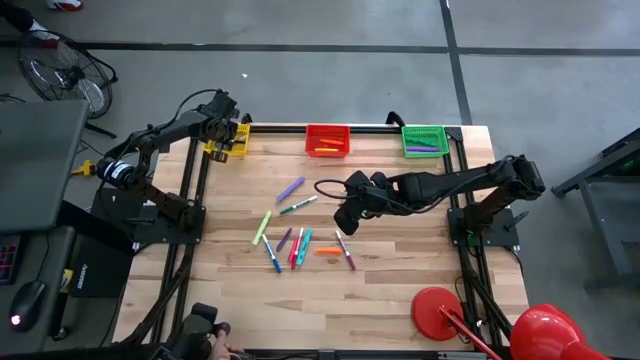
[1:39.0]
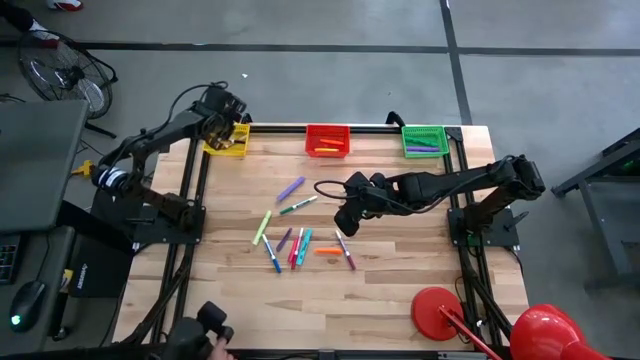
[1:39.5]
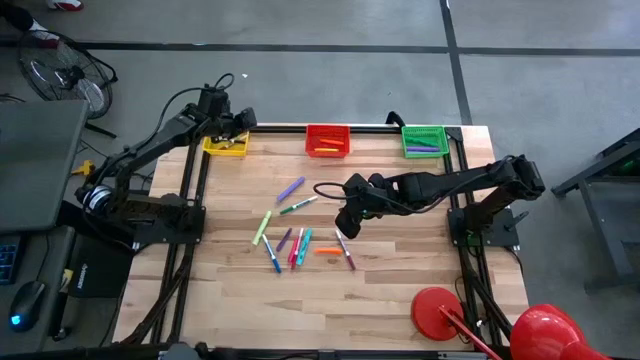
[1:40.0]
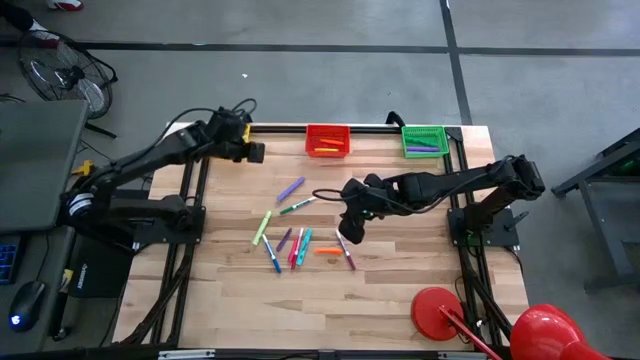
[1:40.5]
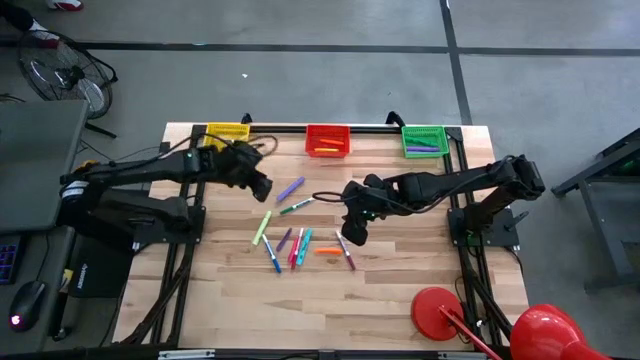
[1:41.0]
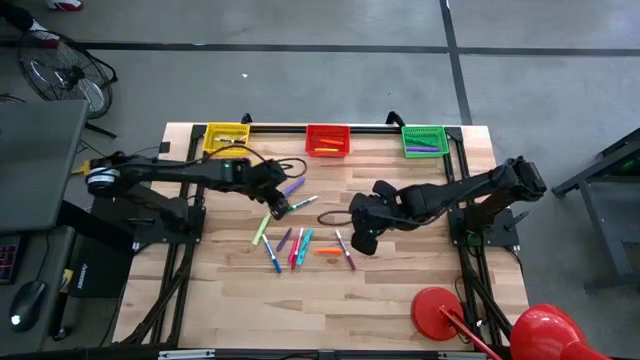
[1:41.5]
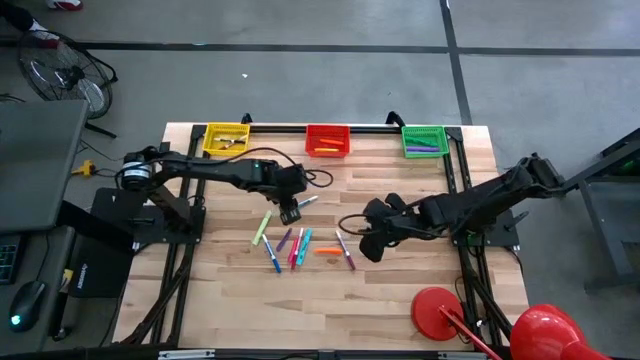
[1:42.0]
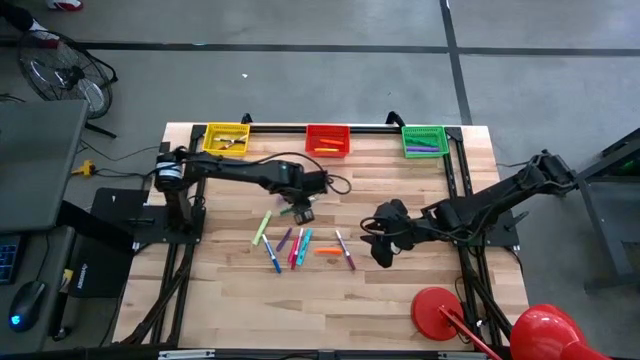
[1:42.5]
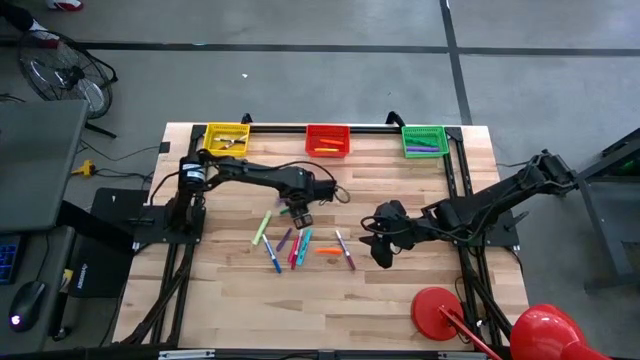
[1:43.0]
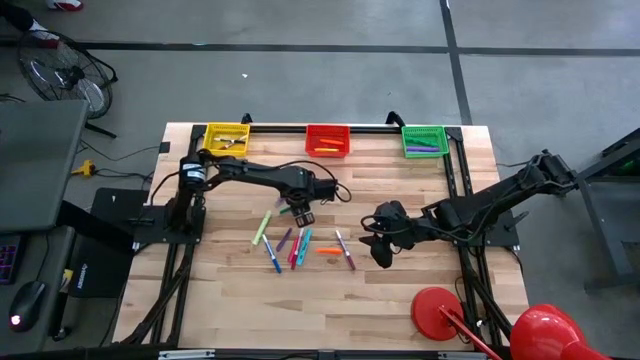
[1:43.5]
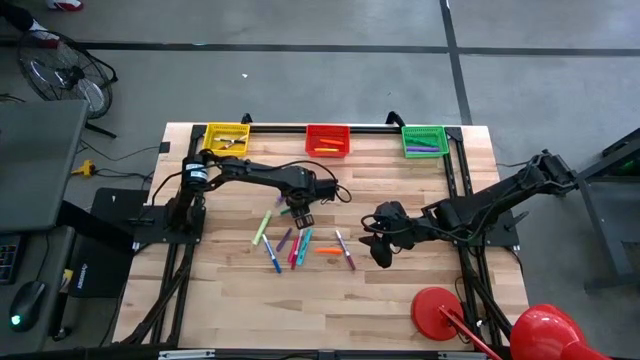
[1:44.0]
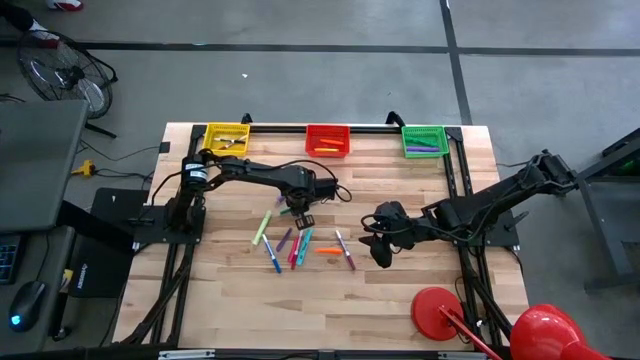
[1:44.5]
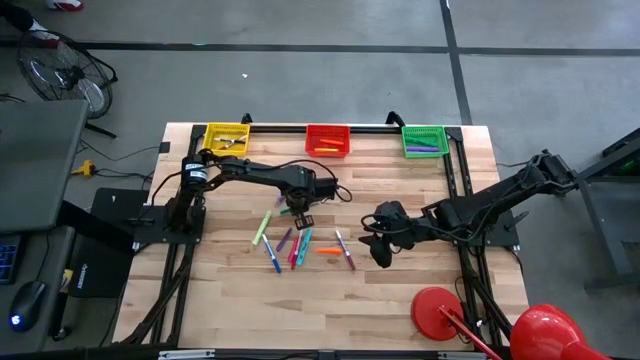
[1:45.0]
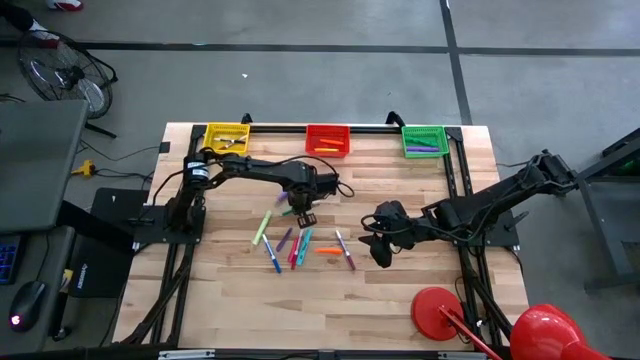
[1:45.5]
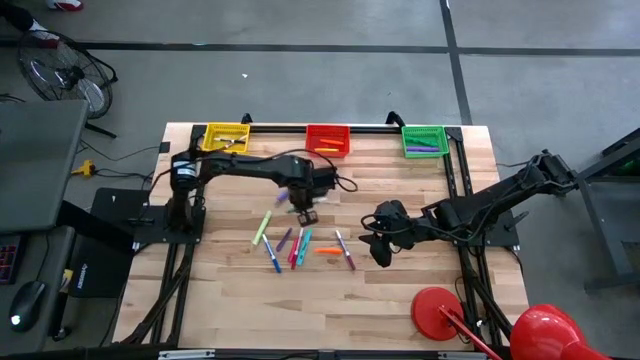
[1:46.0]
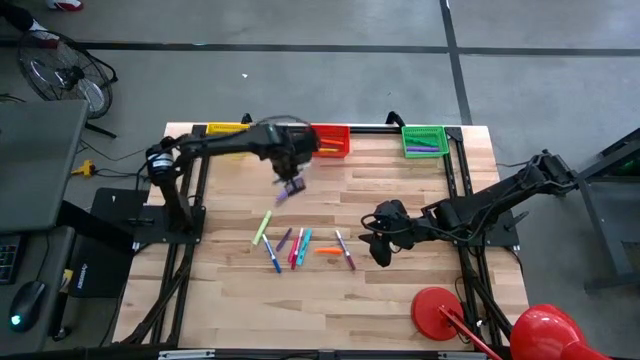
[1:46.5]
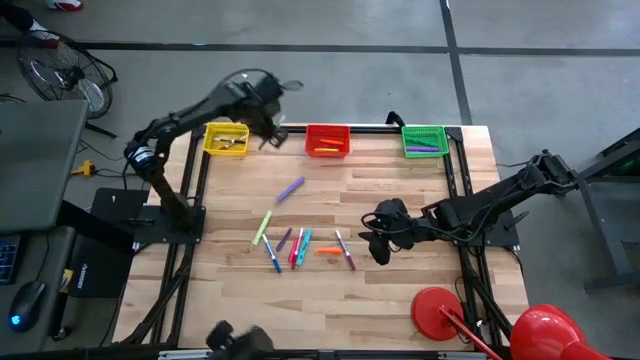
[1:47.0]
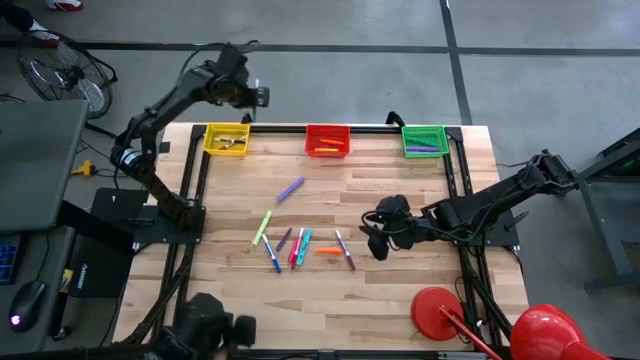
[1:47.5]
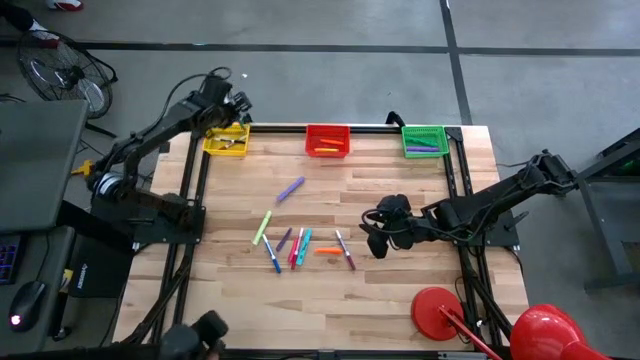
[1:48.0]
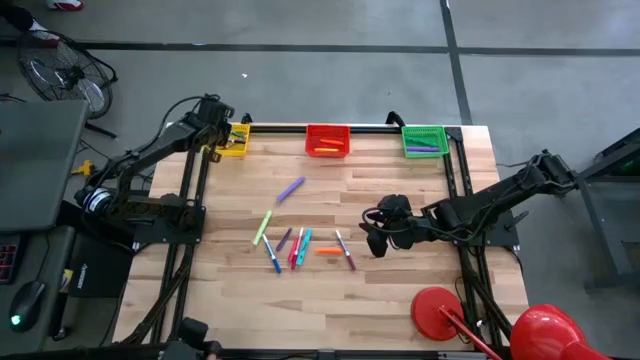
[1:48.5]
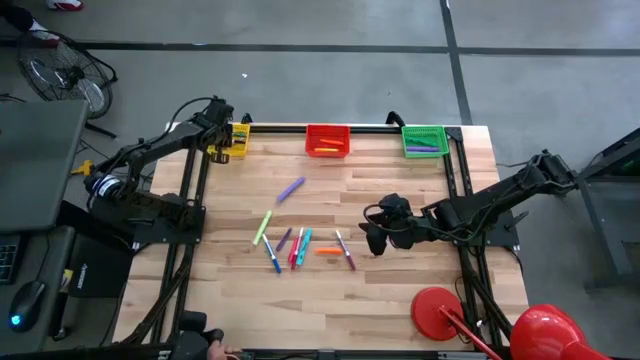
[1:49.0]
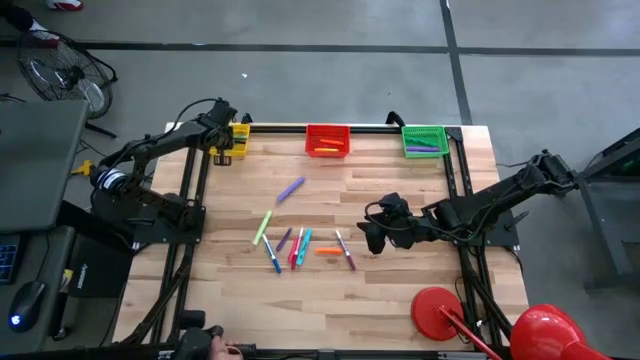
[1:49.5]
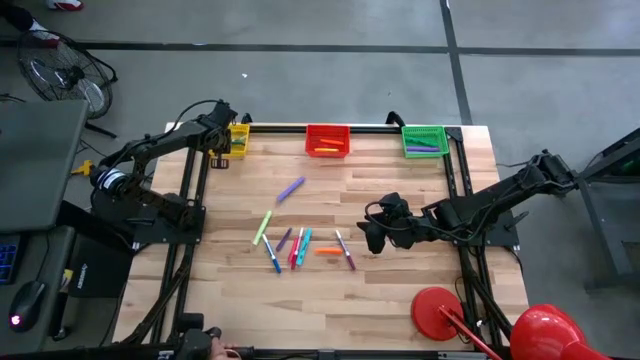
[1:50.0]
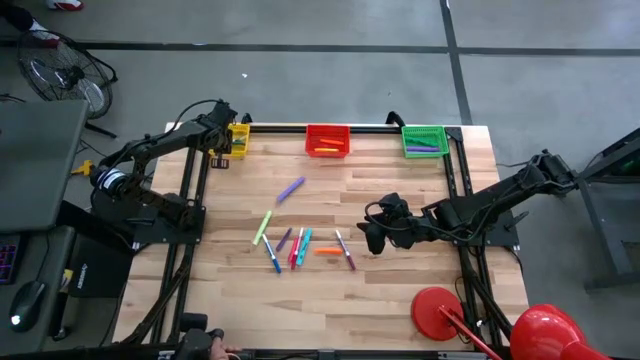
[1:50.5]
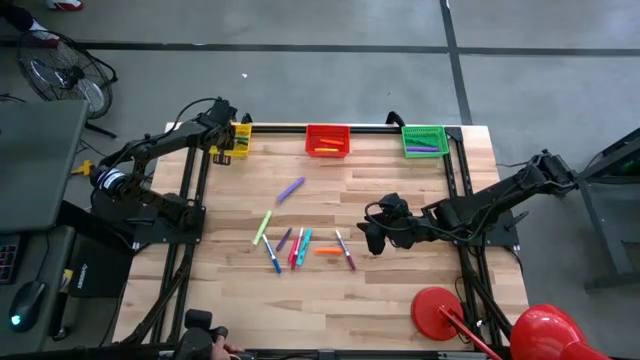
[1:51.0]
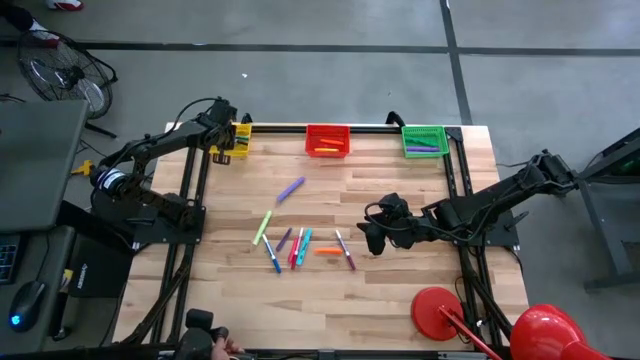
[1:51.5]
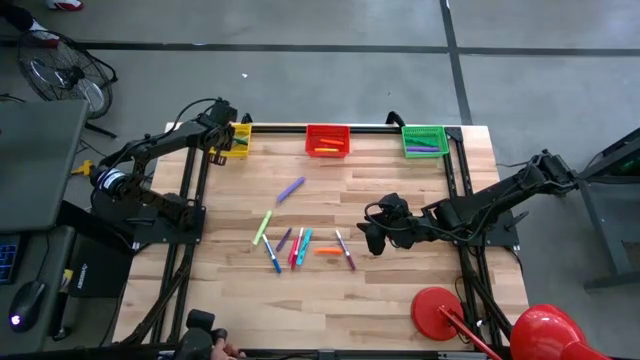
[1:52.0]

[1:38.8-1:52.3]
Task: Pick & Place Markers
Put the green marker into the yellow bin

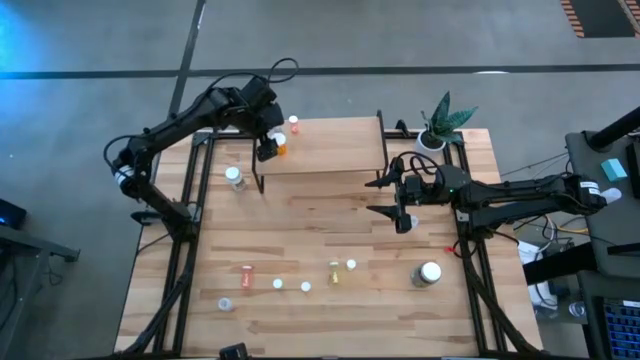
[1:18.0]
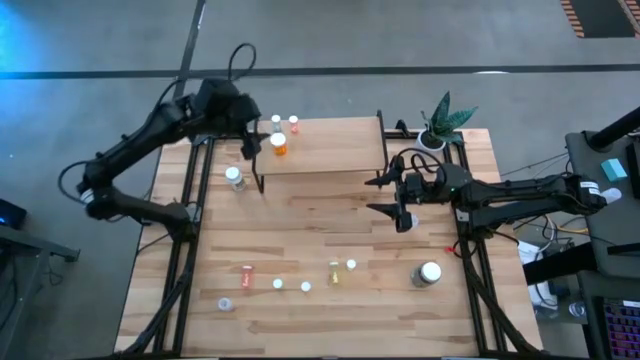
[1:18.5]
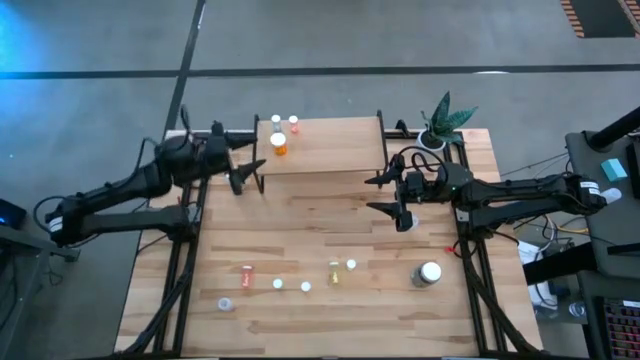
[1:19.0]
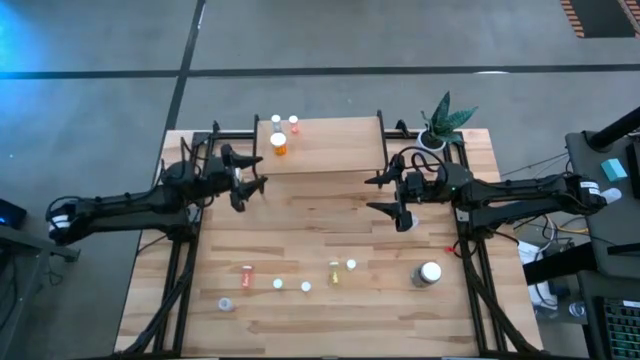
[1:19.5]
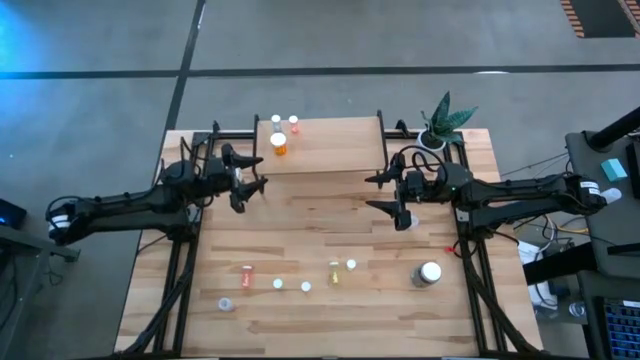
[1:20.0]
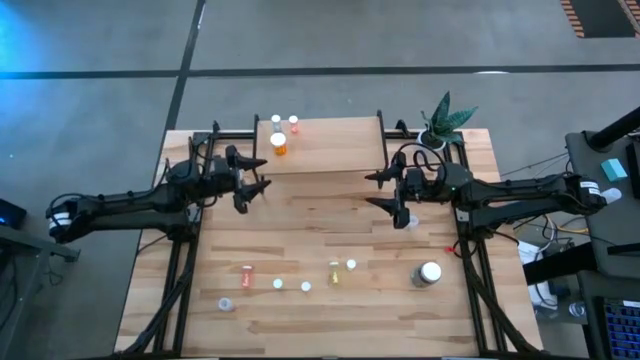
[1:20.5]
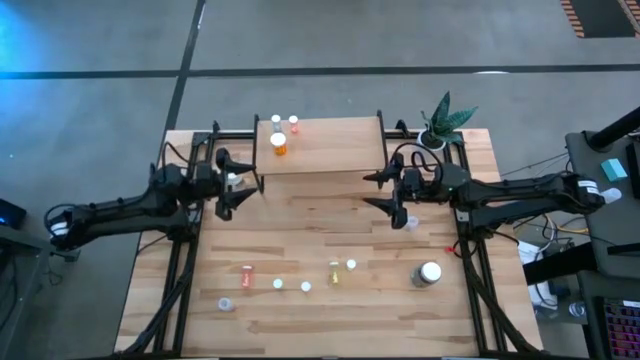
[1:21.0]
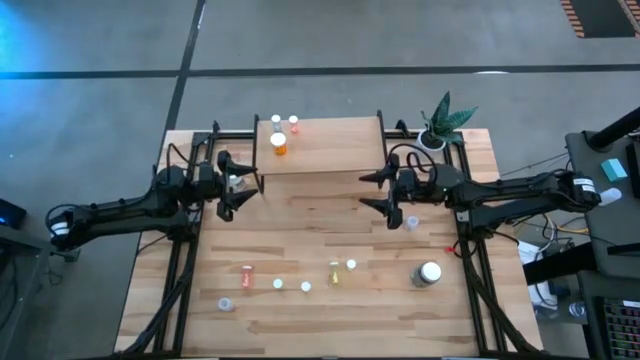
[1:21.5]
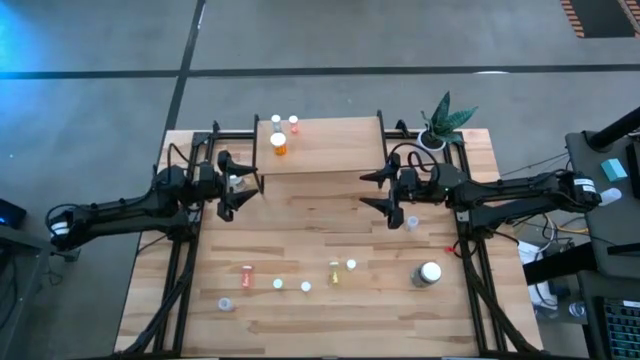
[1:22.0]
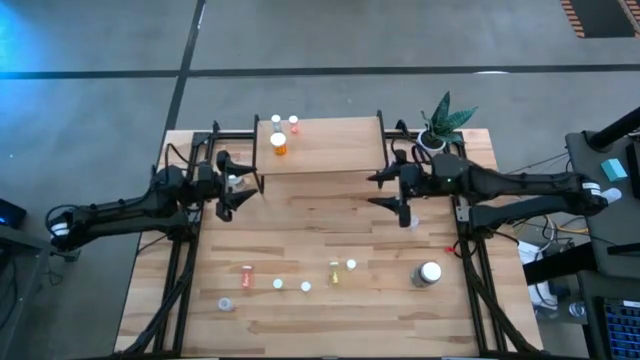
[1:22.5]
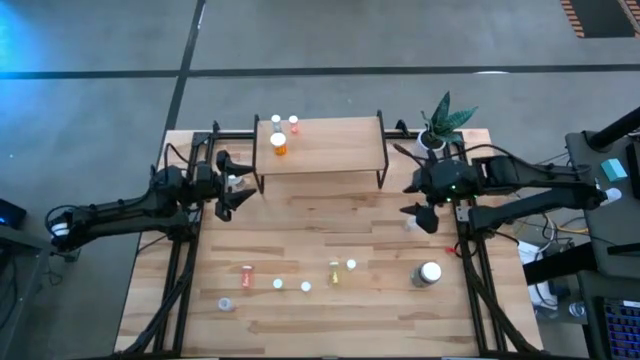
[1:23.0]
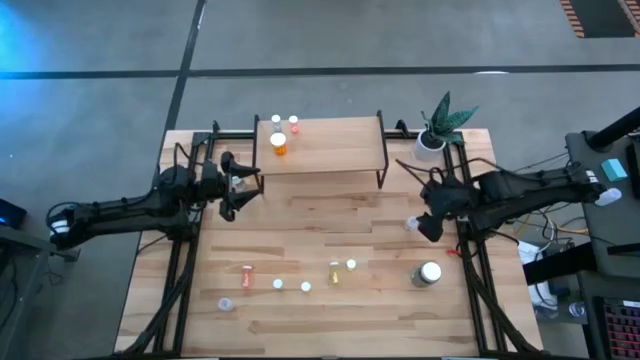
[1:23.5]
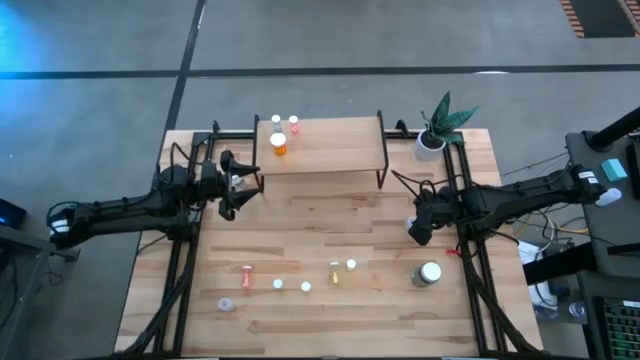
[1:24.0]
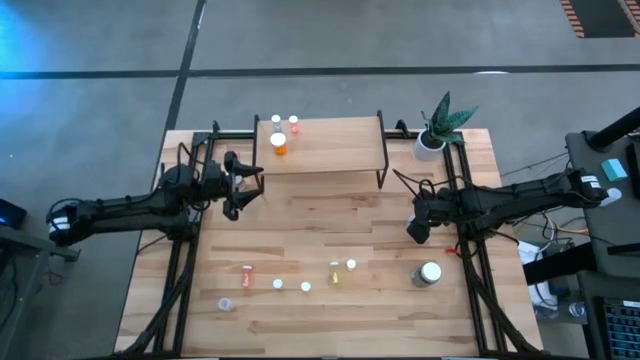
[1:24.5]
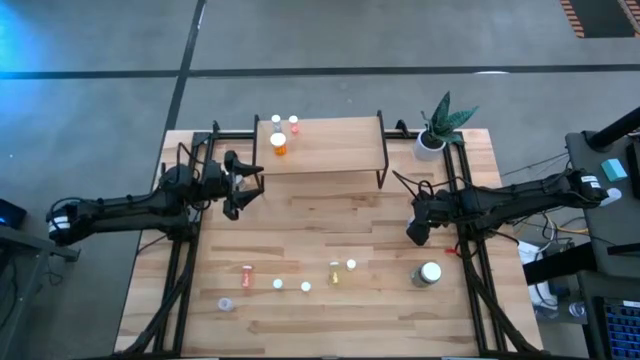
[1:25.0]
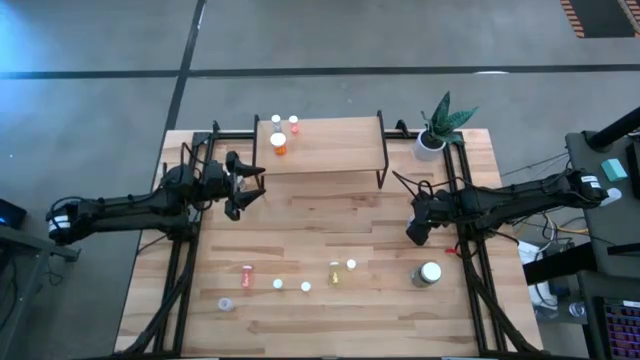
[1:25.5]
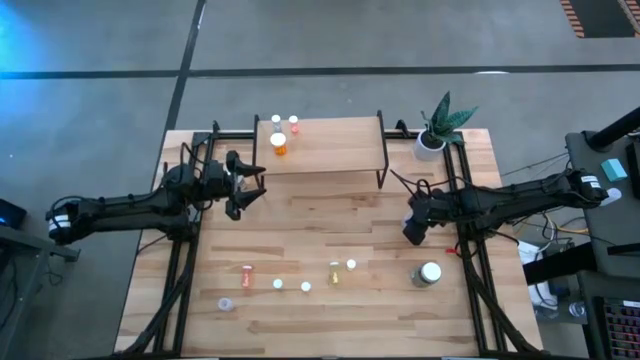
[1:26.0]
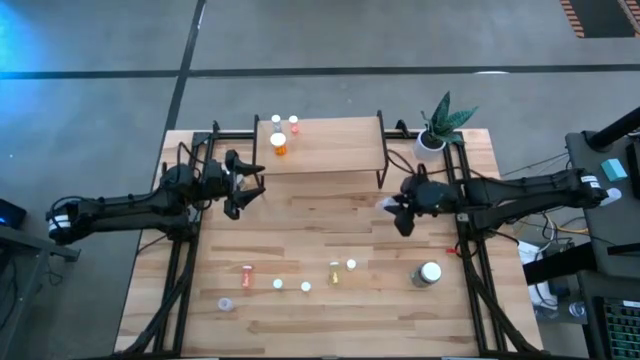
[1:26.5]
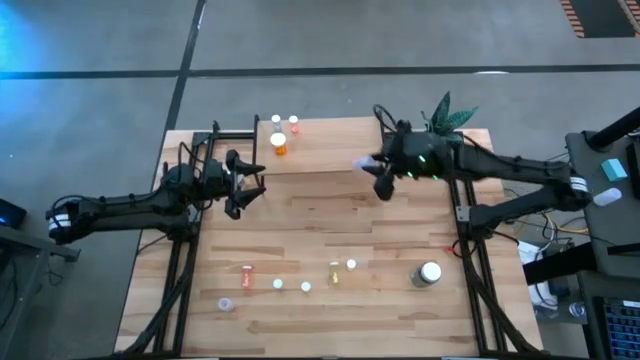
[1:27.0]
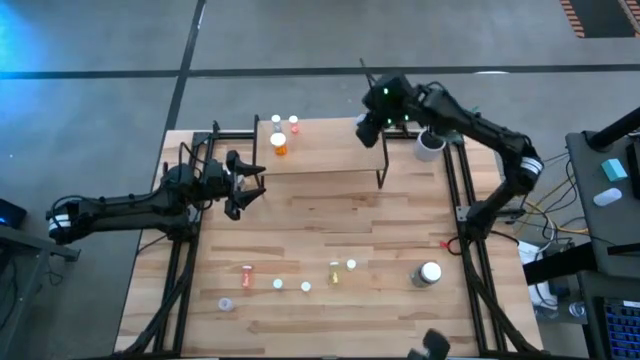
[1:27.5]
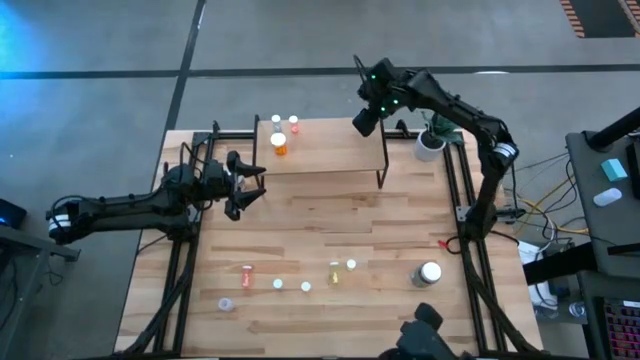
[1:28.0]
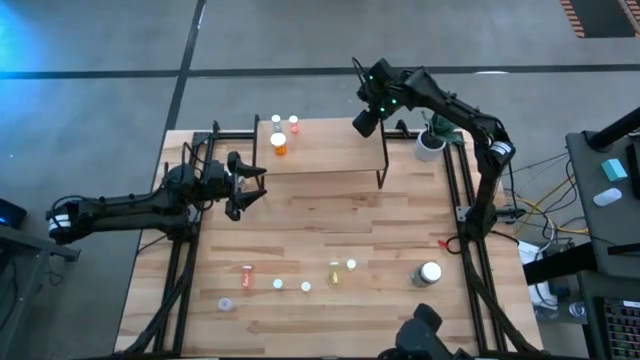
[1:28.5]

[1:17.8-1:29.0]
Task: Pick and place medicine bottles onto shelf by color
Put the right pink medicine bottle on the shelf
